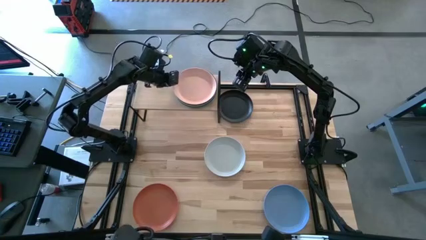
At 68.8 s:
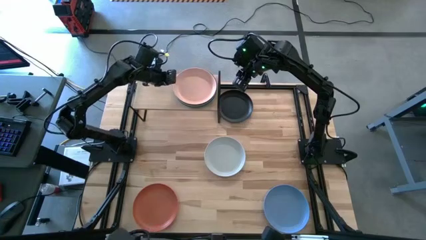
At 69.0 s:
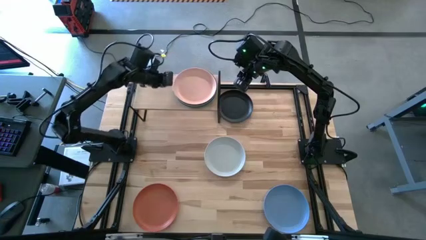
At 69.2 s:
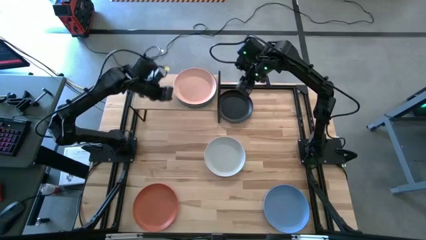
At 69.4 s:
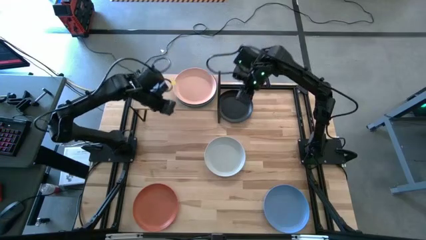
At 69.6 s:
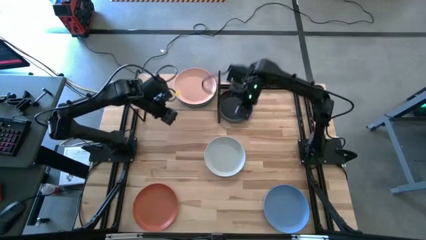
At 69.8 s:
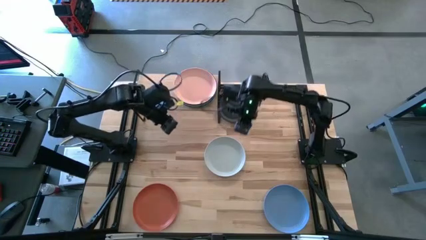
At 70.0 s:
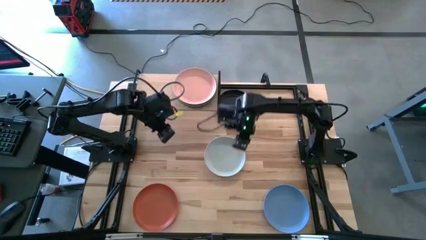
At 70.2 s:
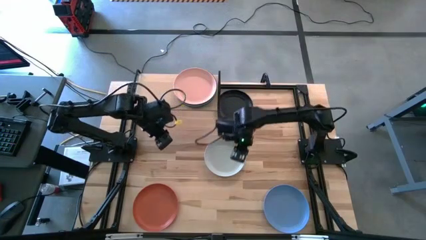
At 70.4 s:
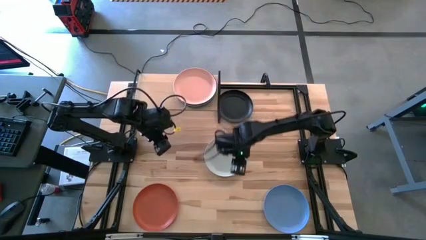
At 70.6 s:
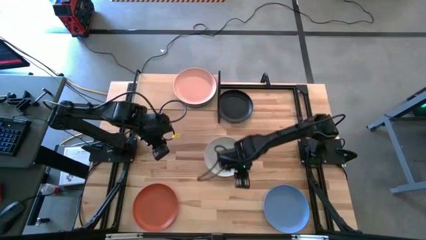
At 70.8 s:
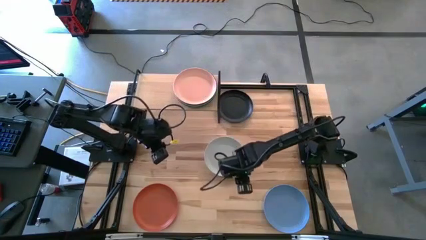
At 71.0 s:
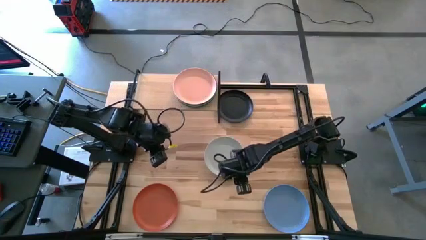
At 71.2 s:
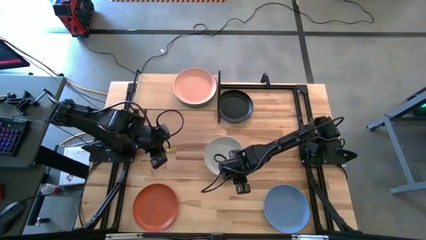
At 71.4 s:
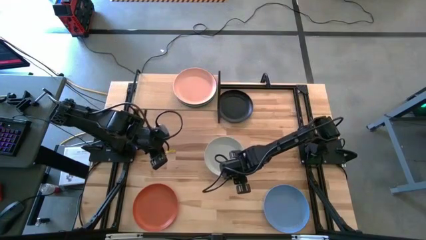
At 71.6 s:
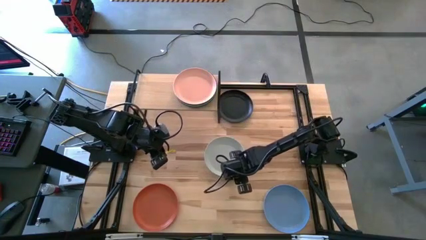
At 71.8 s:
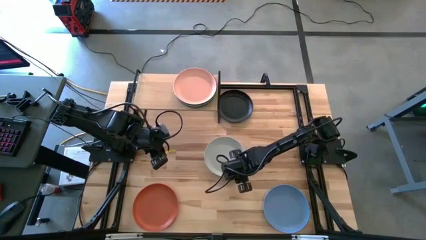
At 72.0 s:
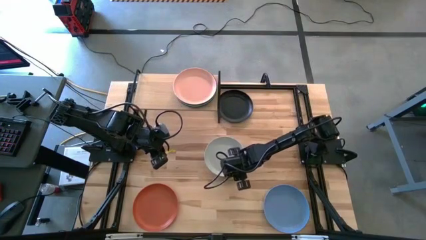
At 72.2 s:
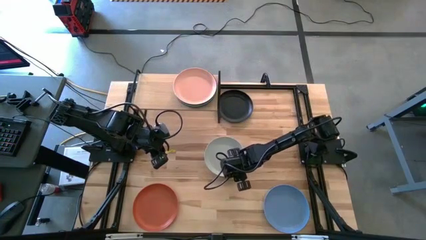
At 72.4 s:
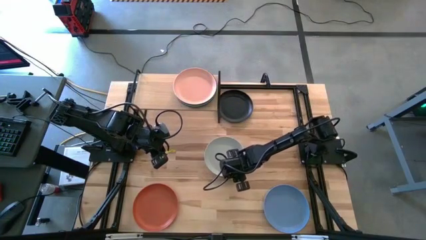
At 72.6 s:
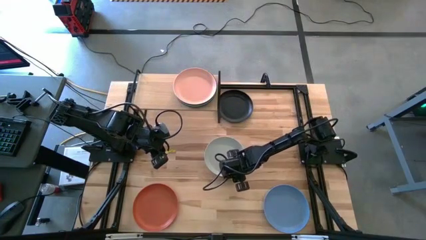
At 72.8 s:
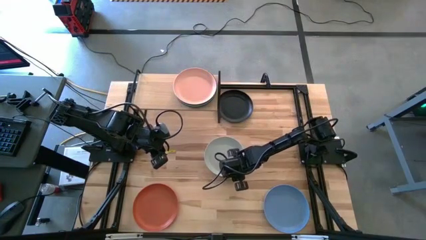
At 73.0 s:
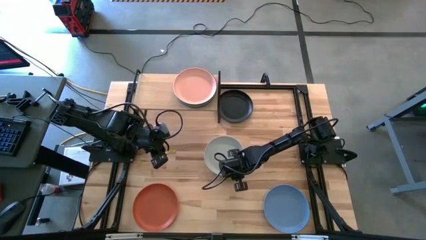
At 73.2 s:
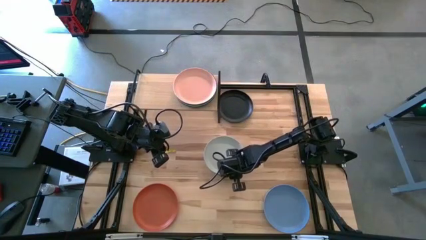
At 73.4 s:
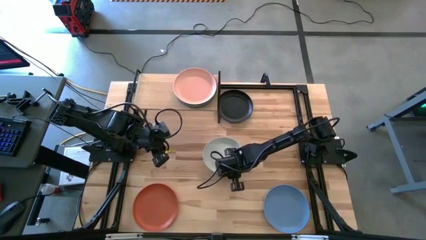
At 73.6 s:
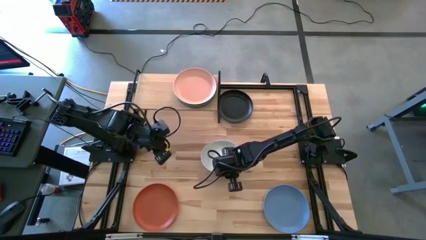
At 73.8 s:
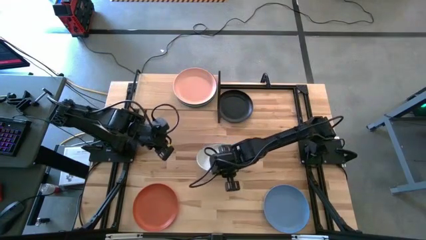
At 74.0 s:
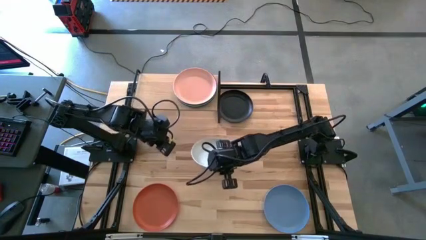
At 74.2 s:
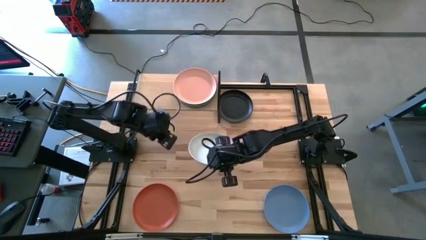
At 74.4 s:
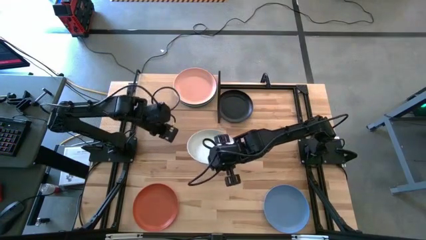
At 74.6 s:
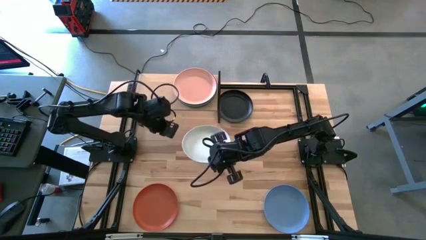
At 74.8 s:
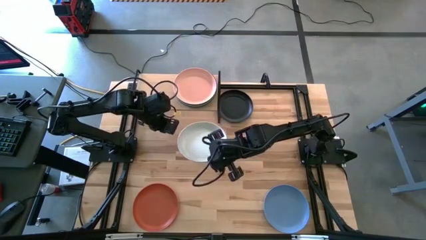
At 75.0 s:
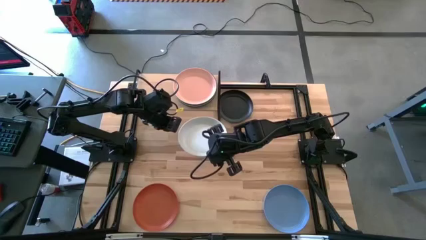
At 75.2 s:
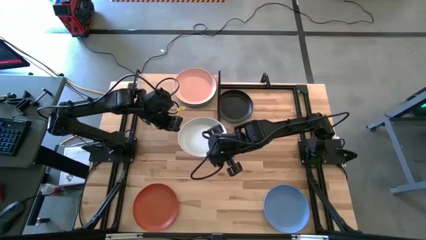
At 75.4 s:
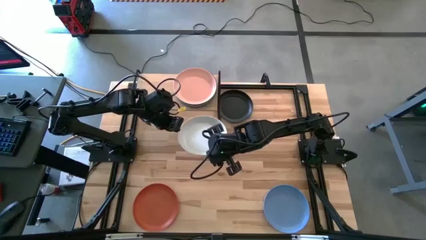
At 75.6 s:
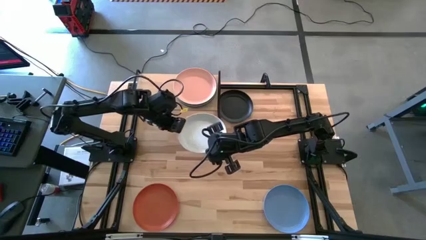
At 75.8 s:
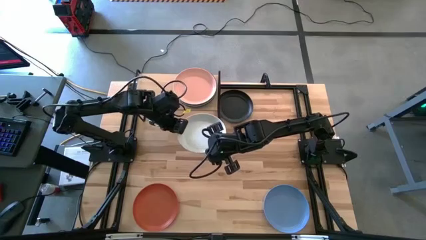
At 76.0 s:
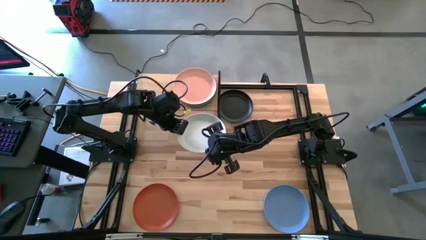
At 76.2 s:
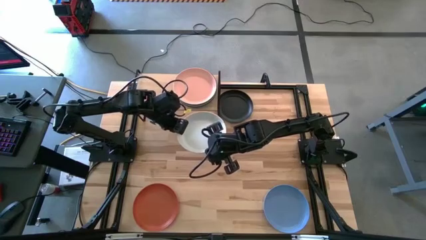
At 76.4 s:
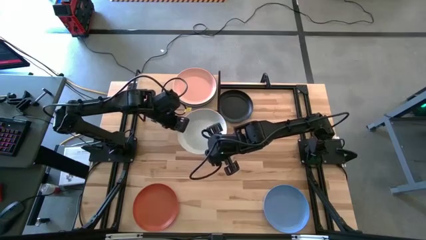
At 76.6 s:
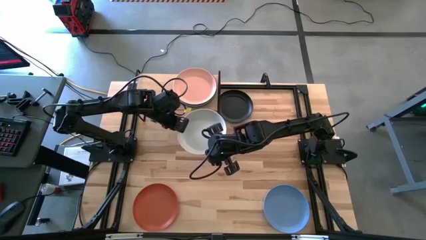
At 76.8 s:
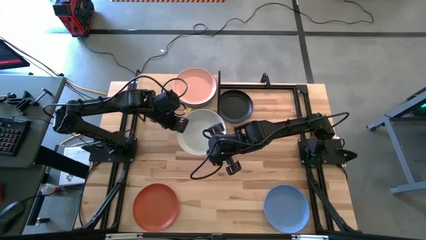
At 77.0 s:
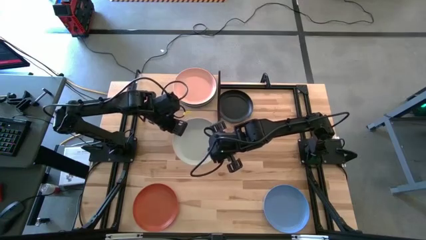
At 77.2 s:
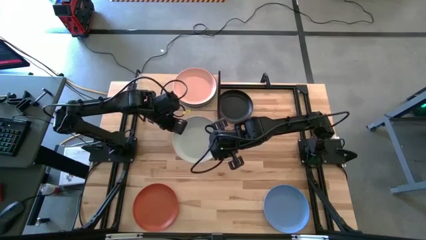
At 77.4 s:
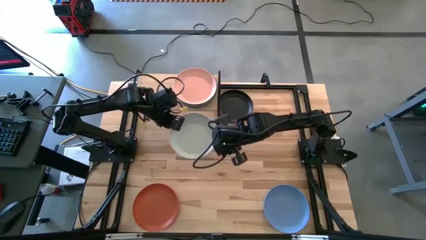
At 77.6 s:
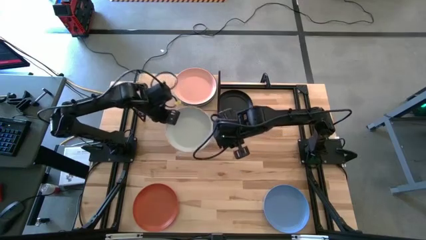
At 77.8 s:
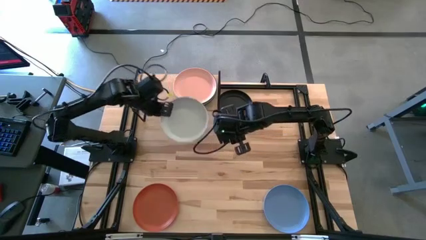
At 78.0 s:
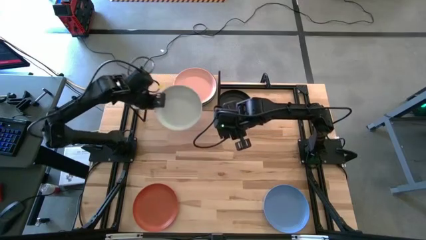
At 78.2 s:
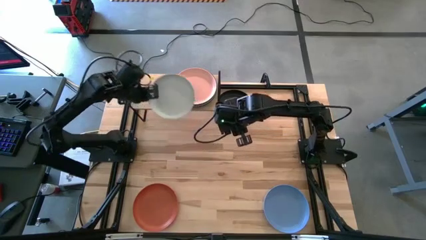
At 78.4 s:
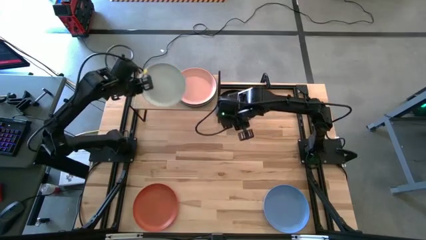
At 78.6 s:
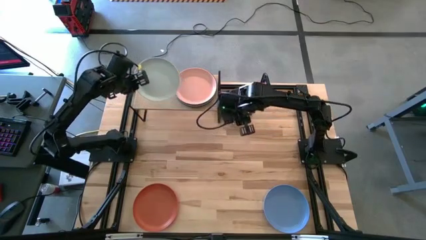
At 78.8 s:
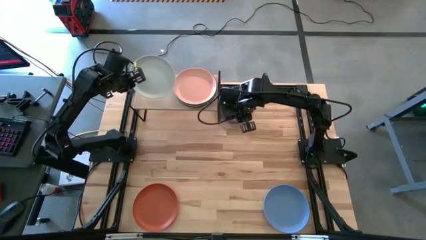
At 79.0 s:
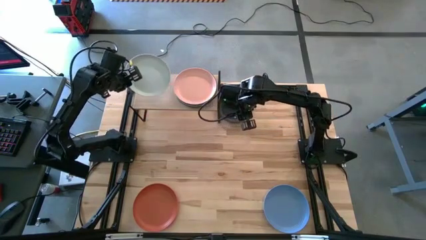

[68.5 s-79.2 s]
Task: Place and stack plates onto a shelf
Put the white plate on the shelf
